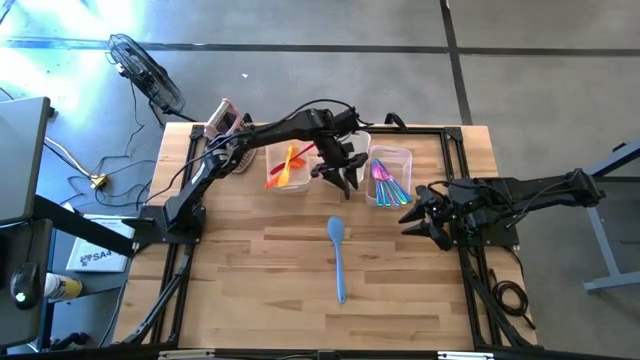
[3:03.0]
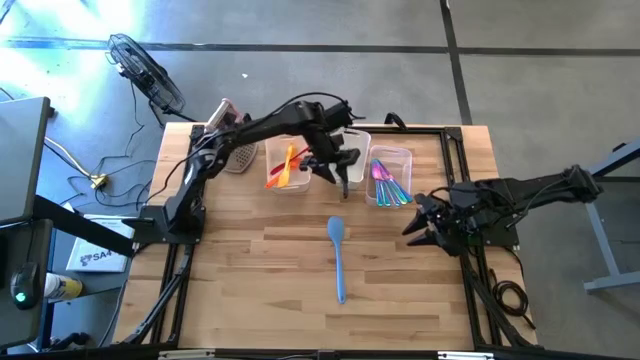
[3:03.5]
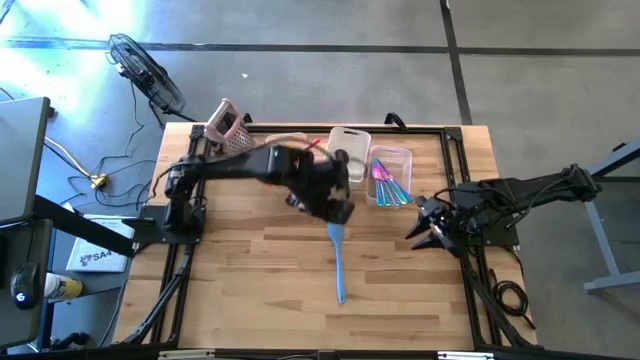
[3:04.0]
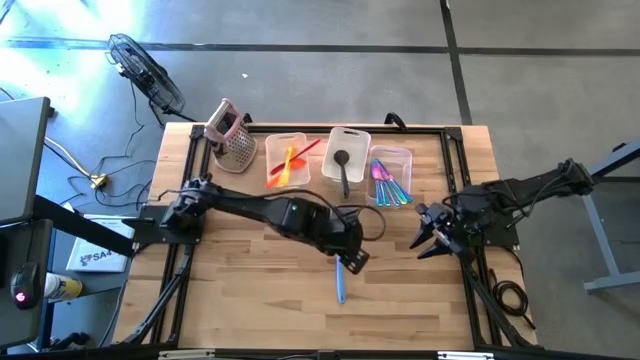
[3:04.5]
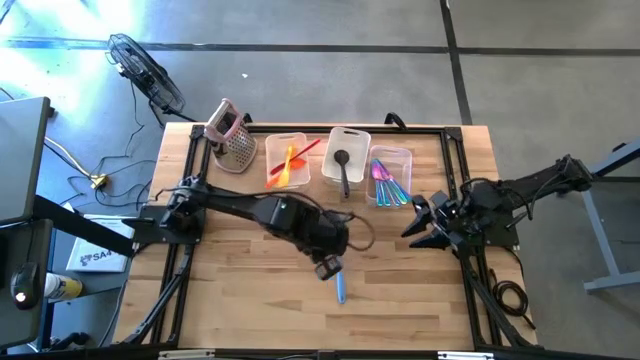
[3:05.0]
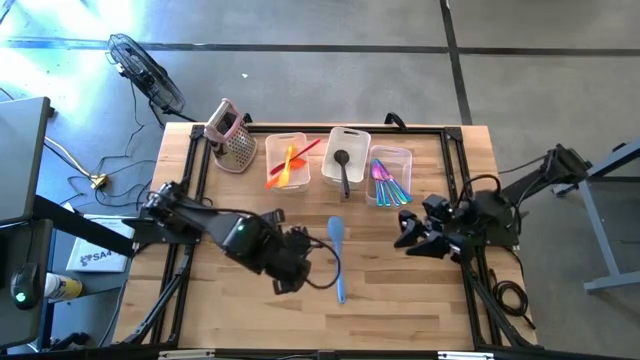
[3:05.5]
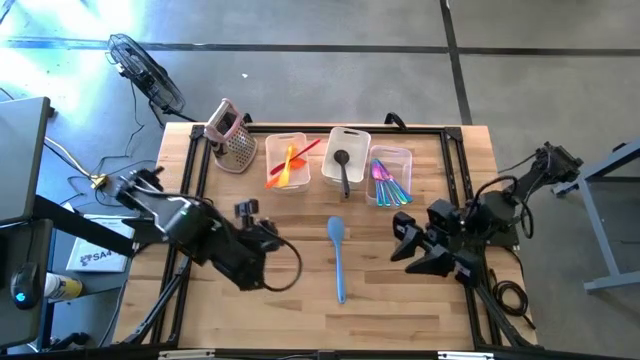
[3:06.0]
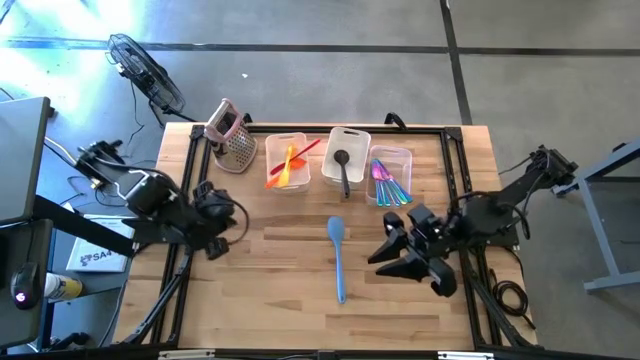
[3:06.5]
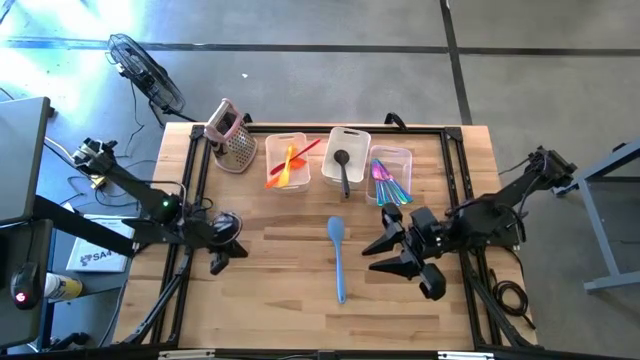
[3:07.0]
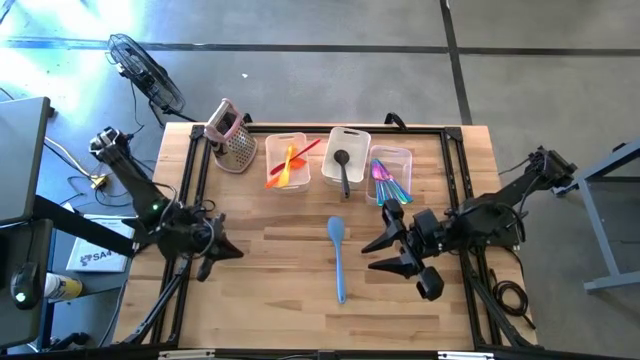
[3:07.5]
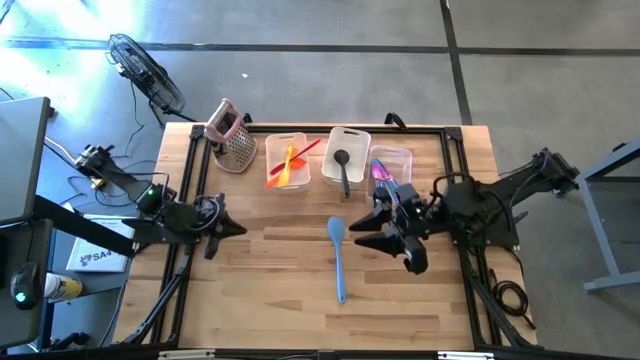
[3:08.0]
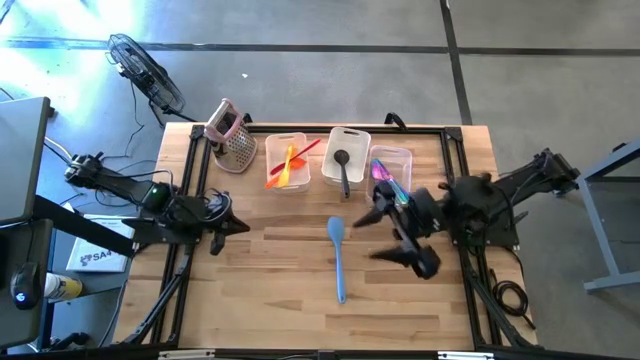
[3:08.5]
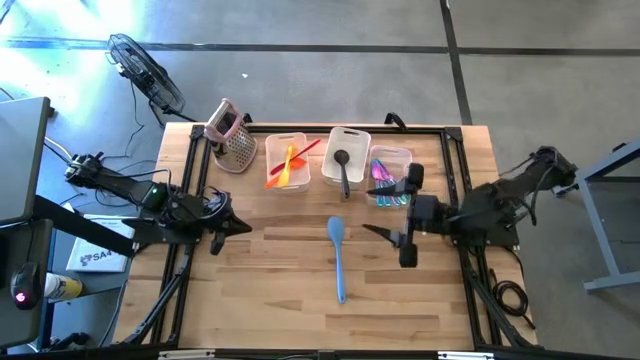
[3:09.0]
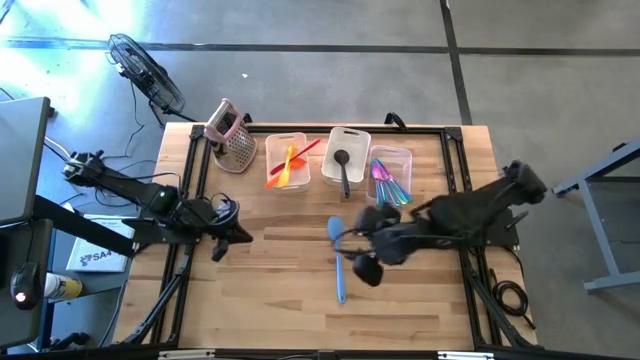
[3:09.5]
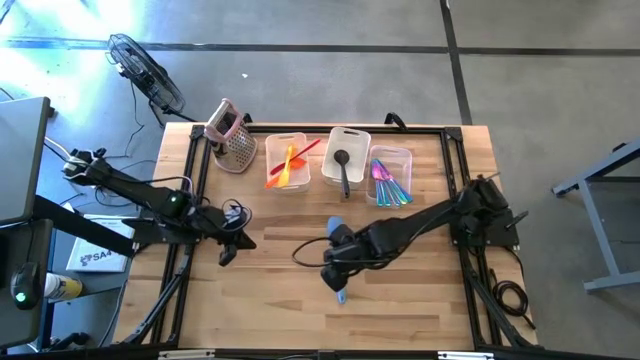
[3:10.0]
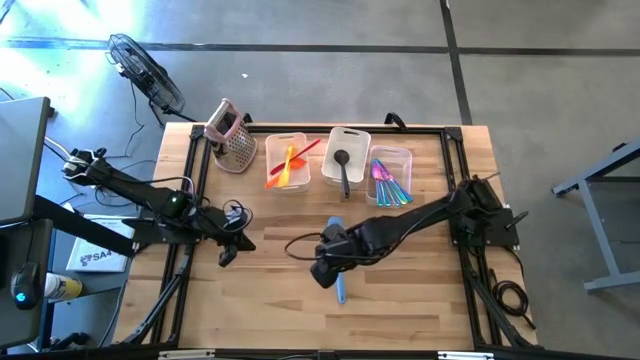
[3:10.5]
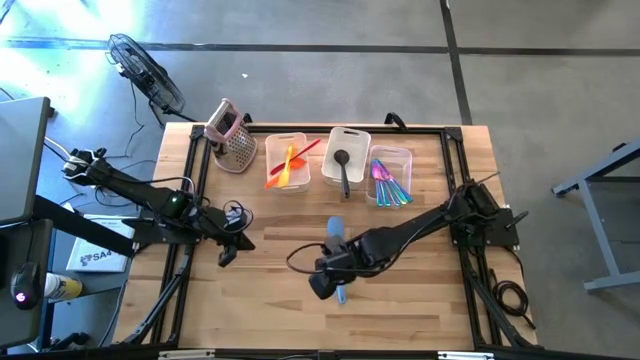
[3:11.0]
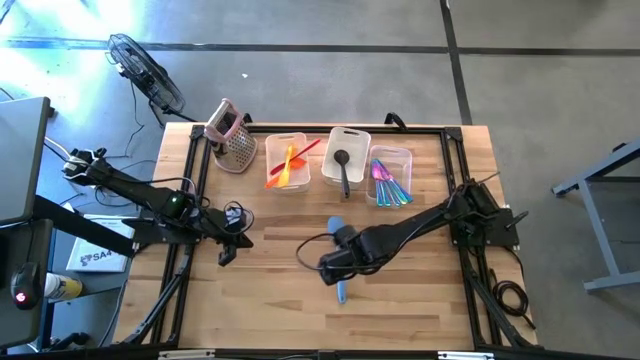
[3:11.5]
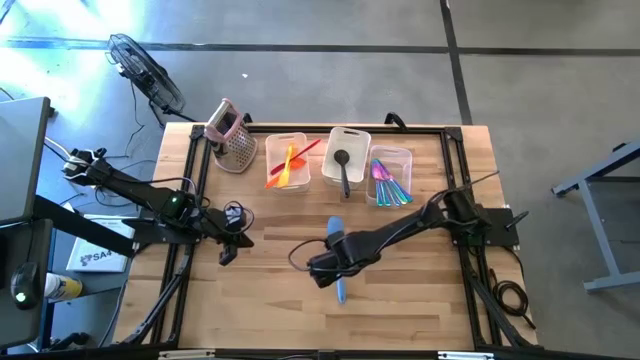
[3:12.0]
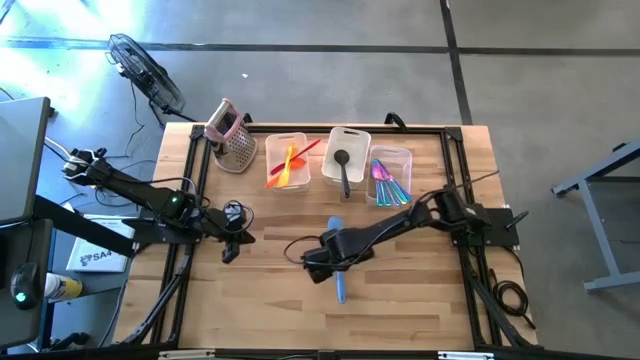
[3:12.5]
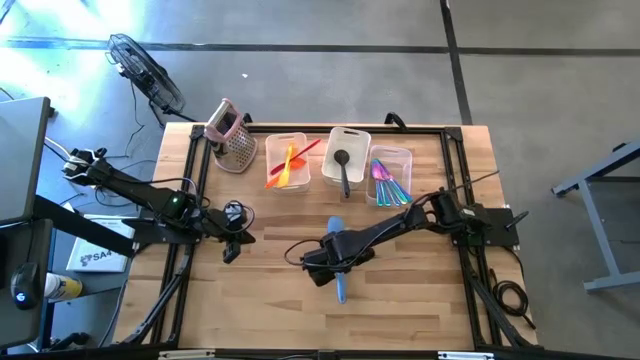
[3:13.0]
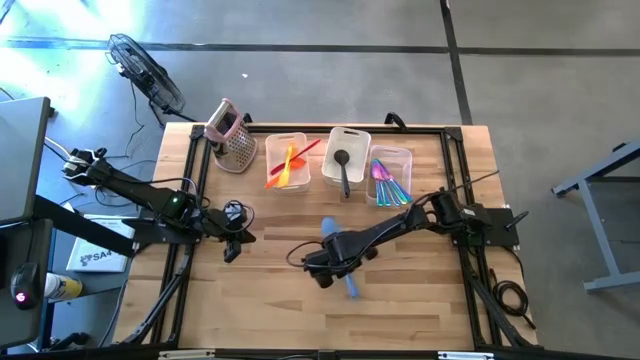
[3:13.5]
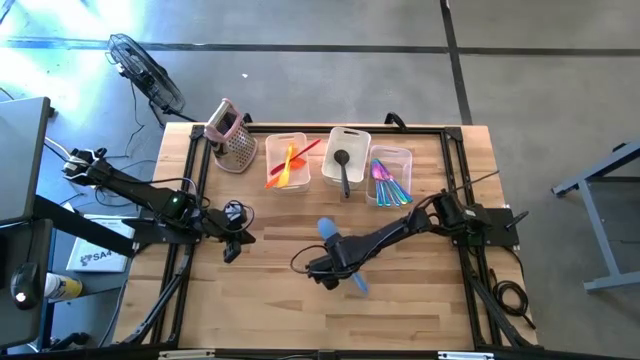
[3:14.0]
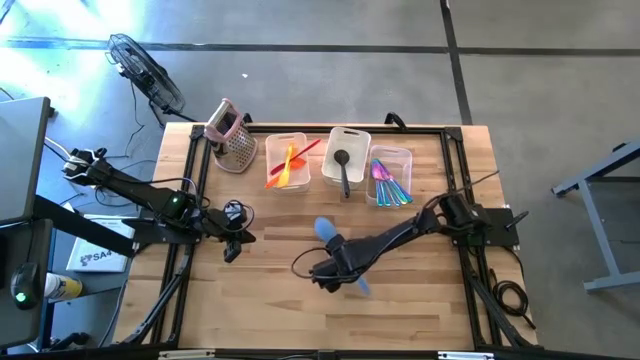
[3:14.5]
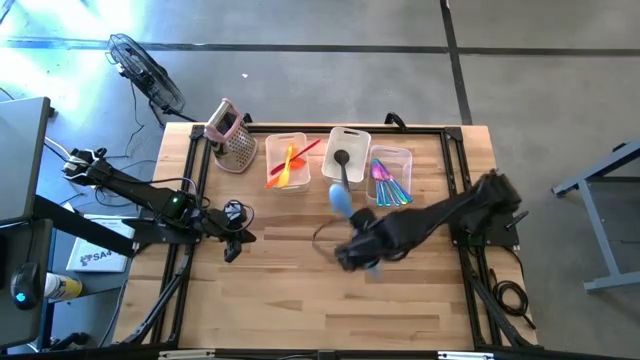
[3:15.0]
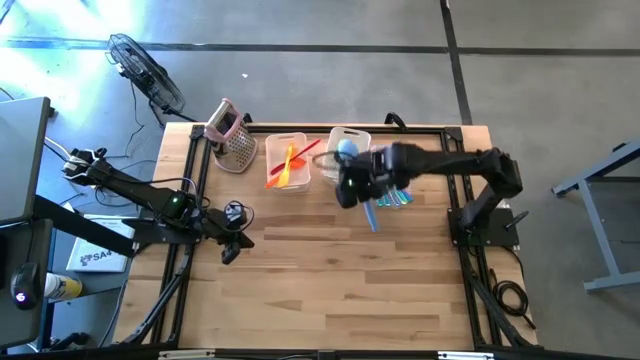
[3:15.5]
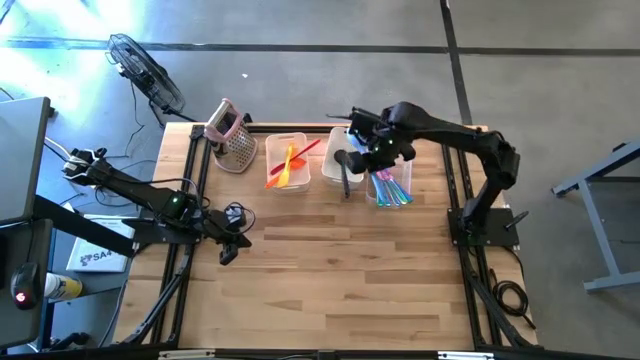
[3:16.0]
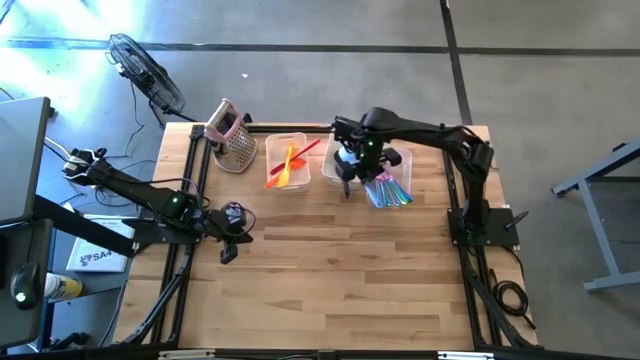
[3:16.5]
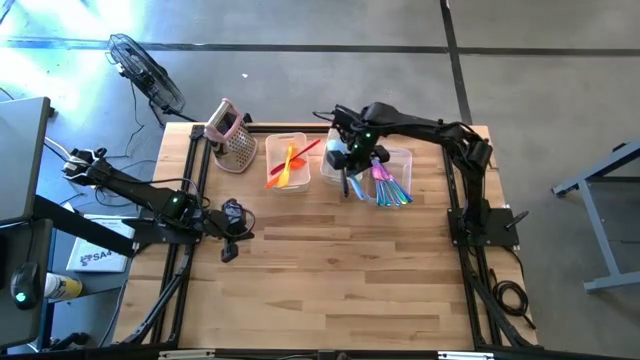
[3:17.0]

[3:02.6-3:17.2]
Task: Pick & Place Kitchen Items
Put the blue serving spoon into the right white bin

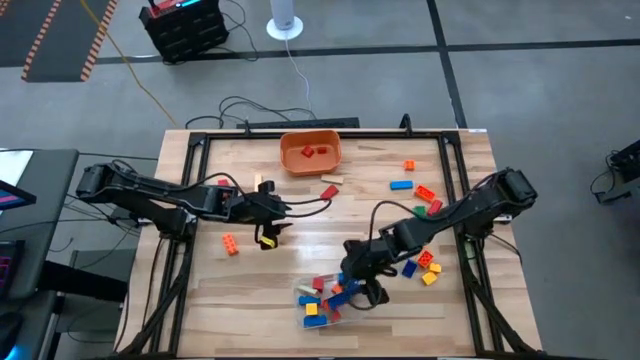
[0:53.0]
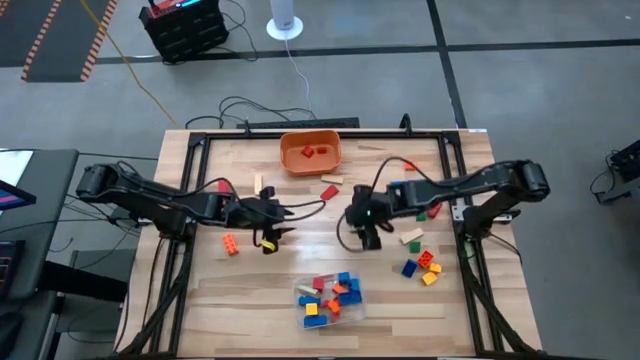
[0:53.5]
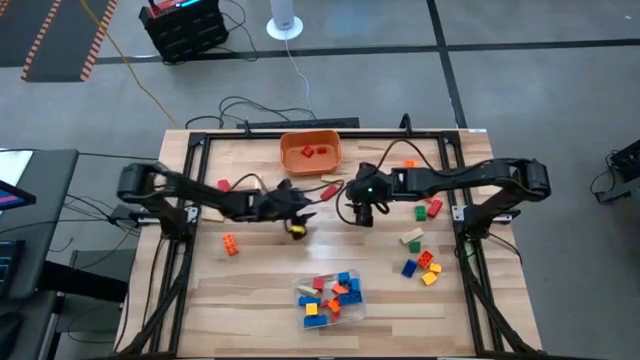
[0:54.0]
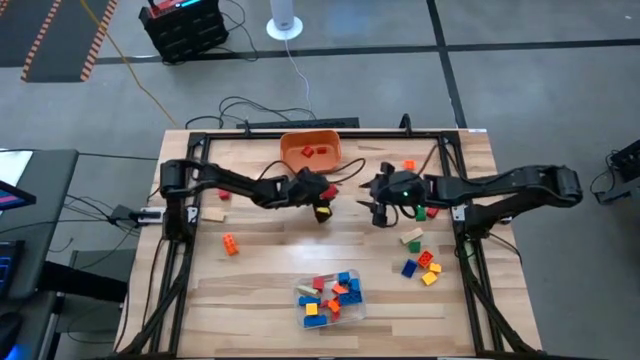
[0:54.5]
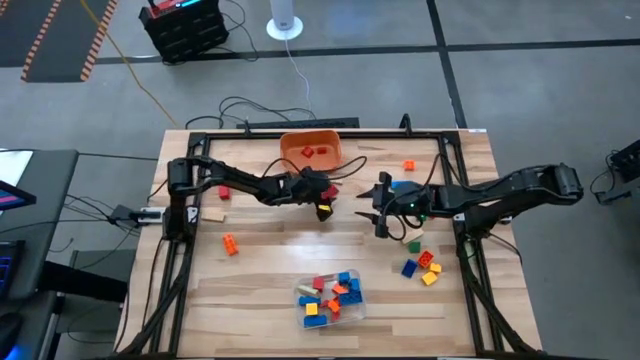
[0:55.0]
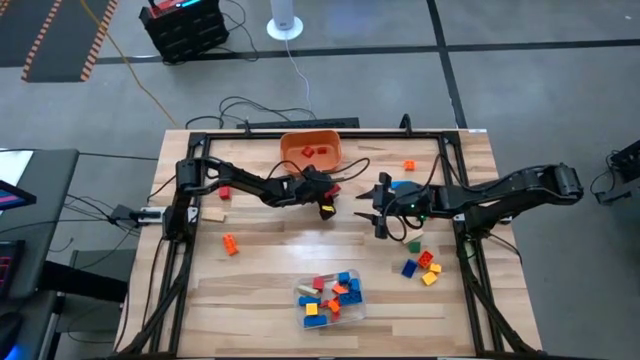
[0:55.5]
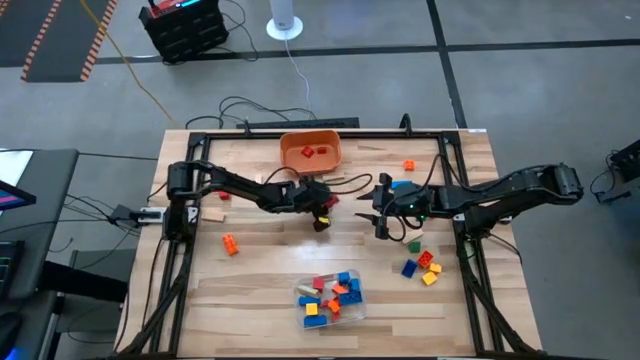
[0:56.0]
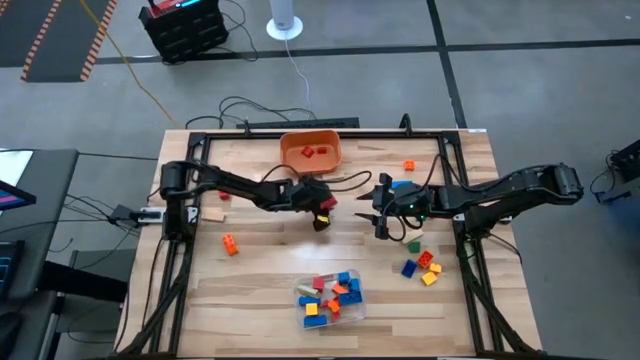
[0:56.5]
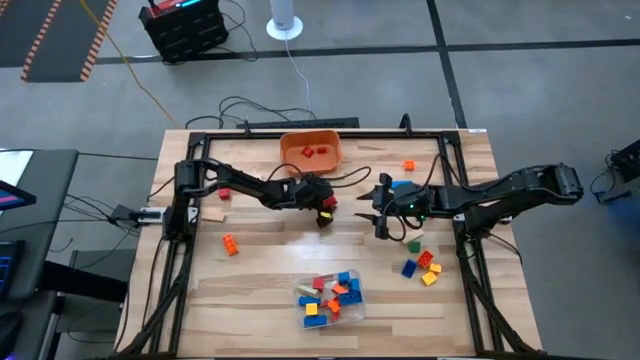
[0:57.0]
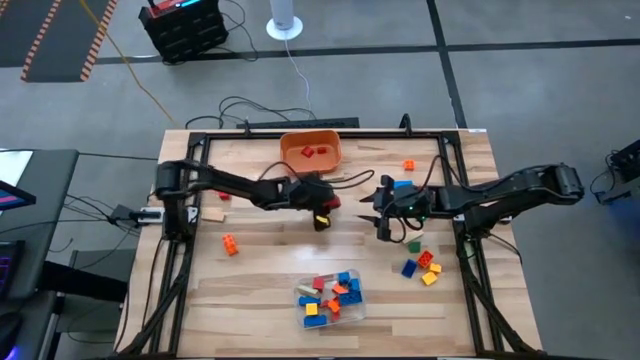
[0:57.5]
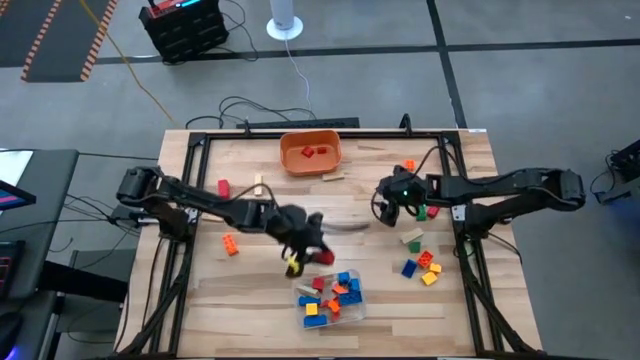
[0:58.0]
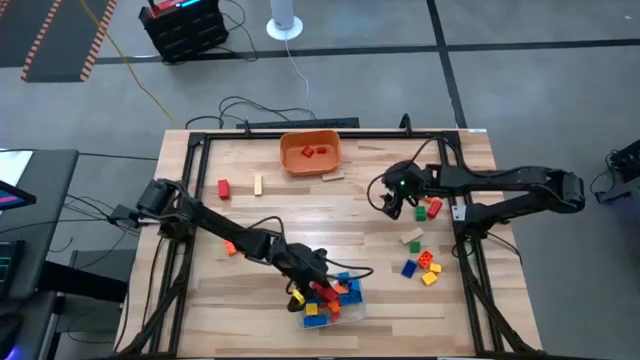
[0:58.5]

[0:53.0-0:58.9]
Task: Sort blocks by size
Put the large red wooden block into the transparent bin

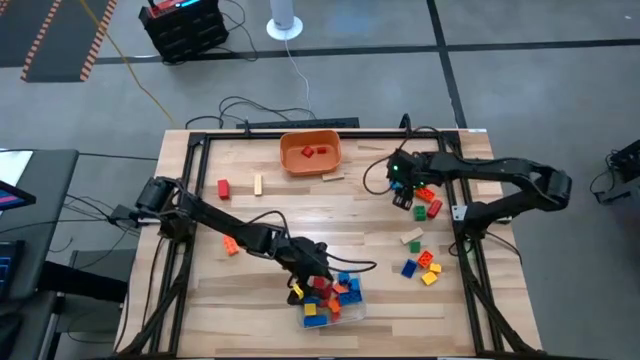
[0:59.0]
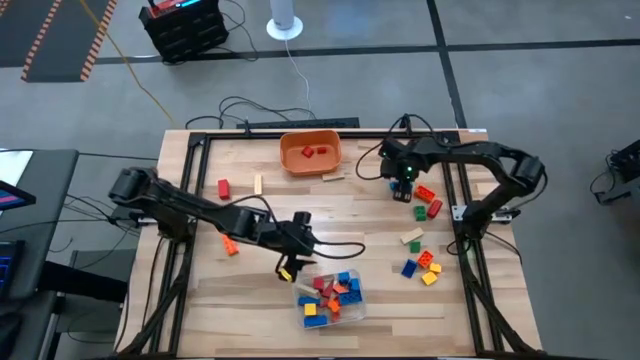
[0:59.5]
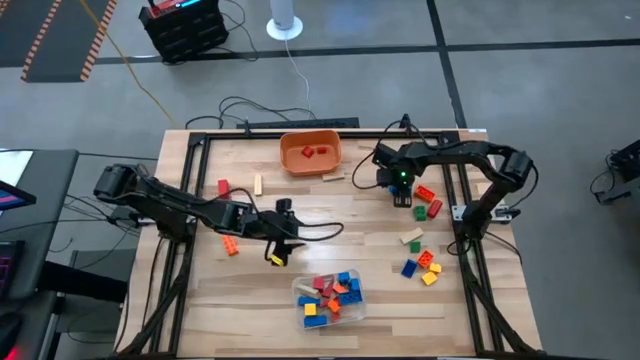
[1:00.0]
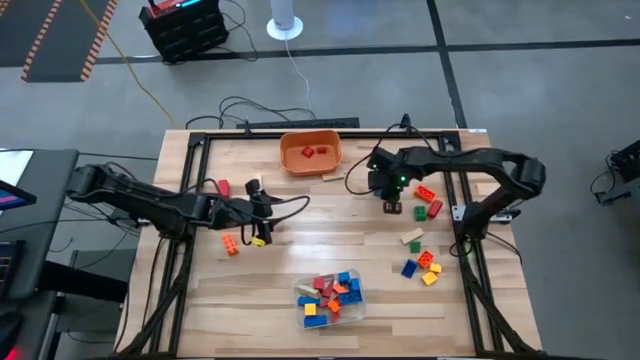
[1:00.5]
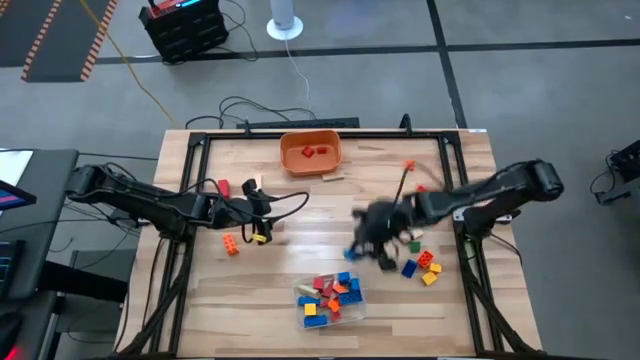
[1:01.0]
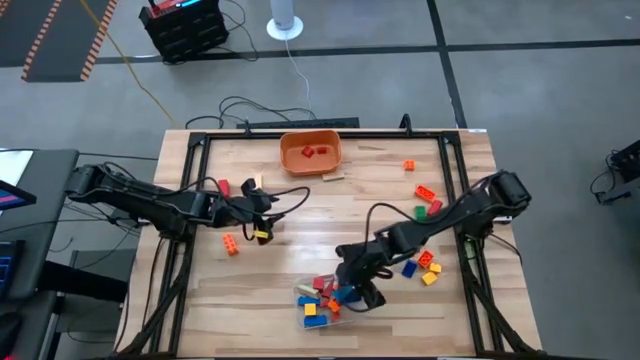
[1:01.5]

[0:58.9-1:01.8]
Put the large blue wooden block into the transparent bin
